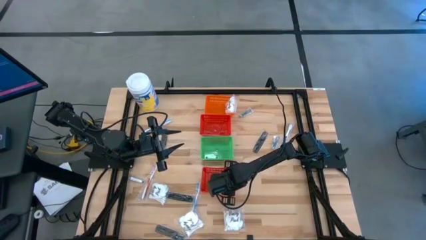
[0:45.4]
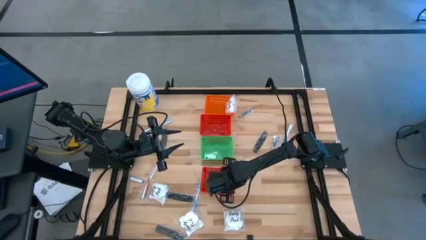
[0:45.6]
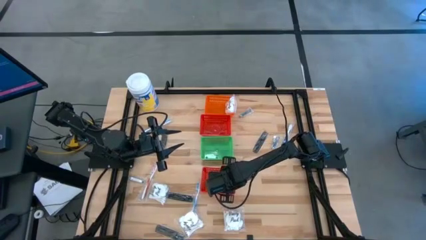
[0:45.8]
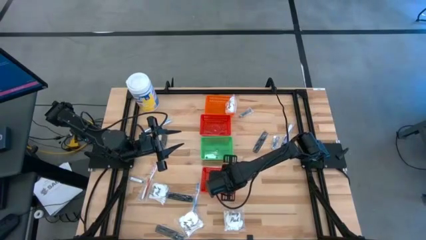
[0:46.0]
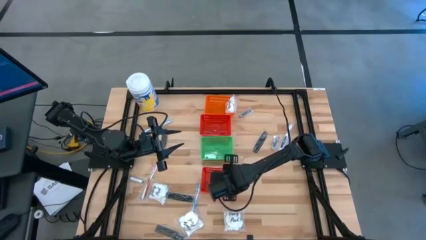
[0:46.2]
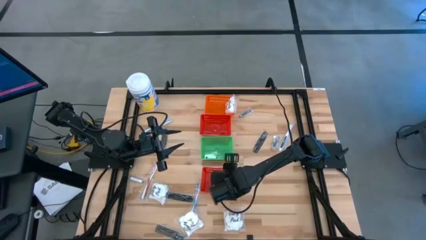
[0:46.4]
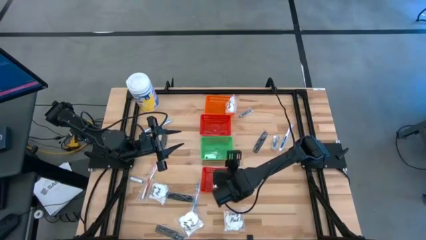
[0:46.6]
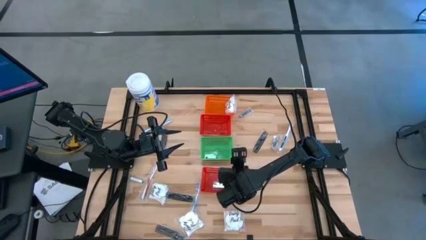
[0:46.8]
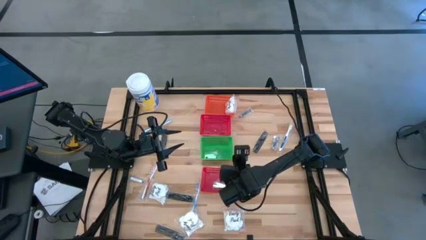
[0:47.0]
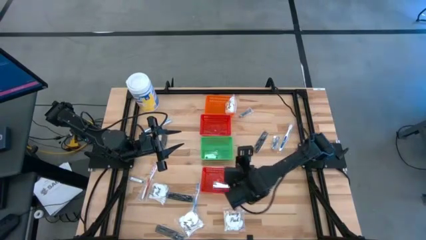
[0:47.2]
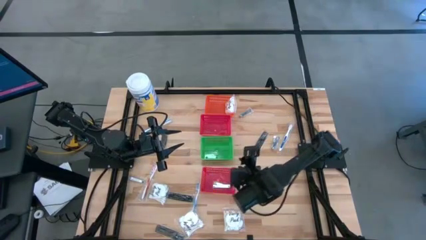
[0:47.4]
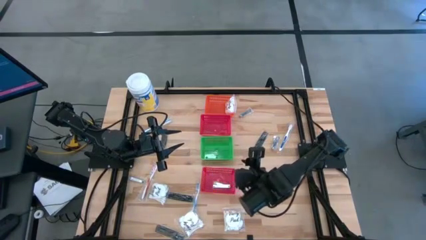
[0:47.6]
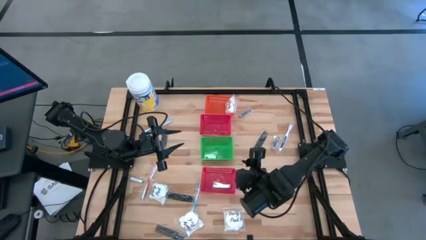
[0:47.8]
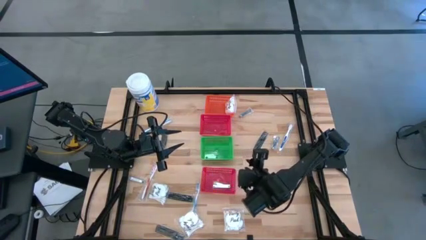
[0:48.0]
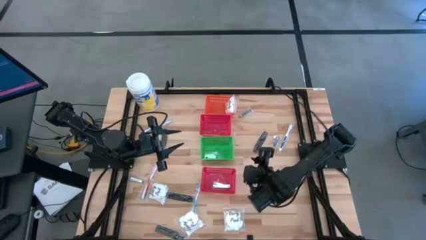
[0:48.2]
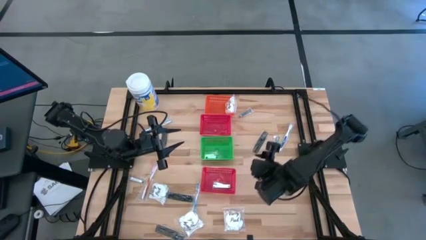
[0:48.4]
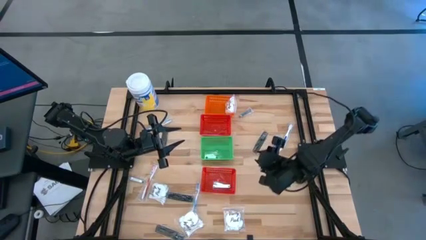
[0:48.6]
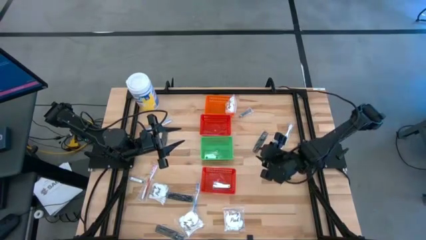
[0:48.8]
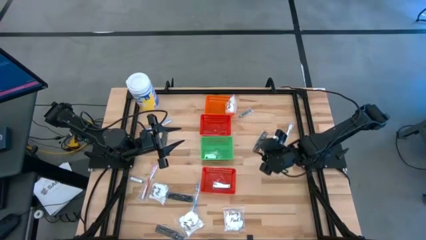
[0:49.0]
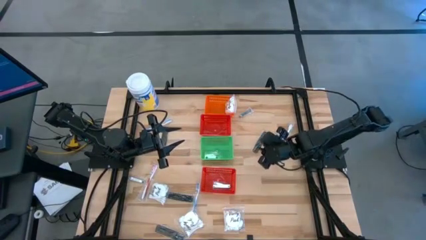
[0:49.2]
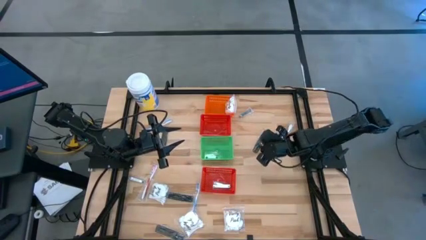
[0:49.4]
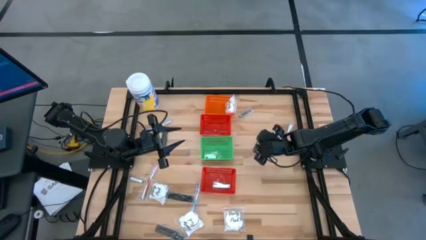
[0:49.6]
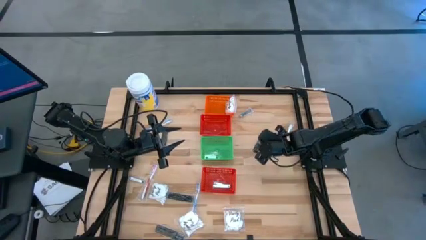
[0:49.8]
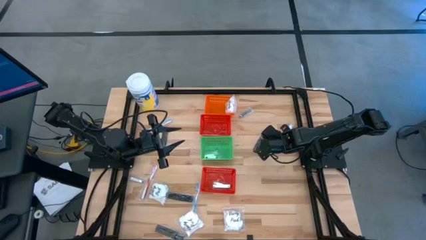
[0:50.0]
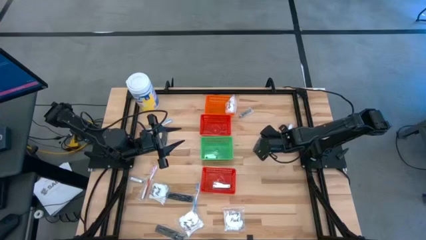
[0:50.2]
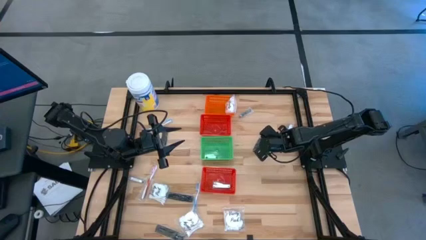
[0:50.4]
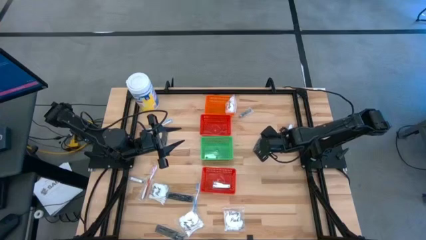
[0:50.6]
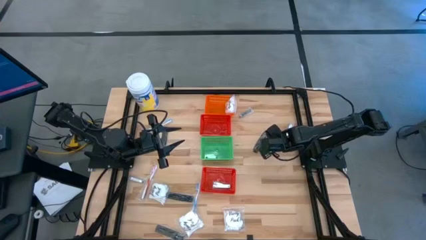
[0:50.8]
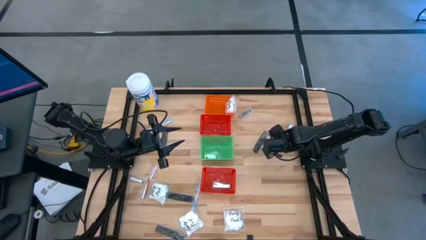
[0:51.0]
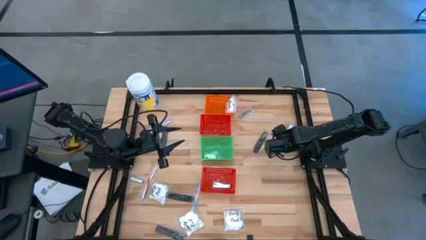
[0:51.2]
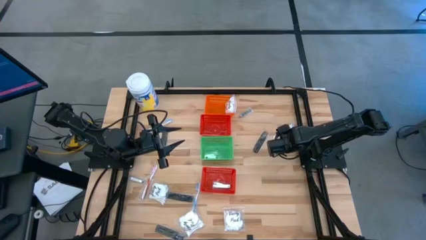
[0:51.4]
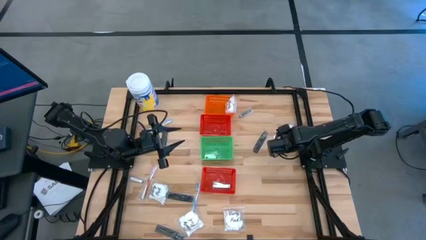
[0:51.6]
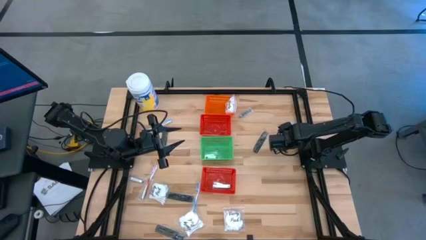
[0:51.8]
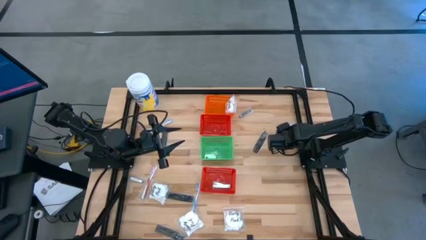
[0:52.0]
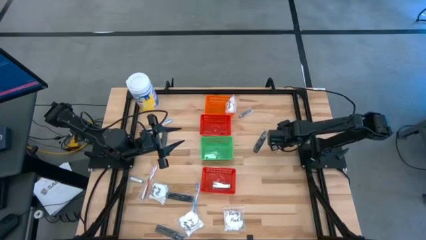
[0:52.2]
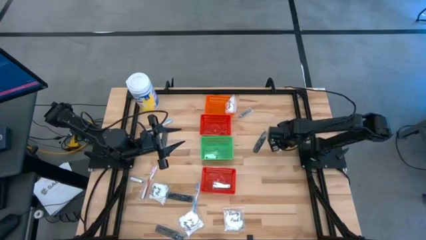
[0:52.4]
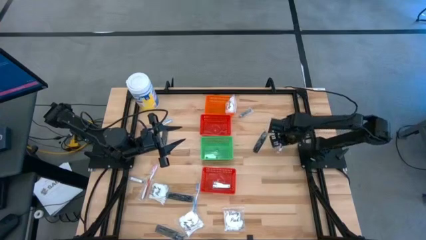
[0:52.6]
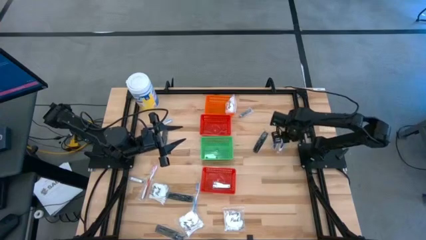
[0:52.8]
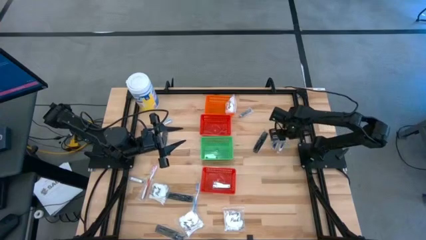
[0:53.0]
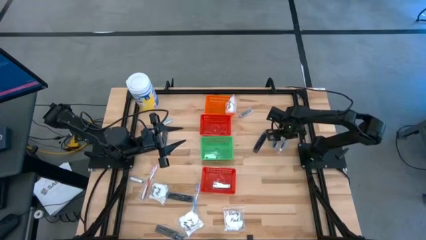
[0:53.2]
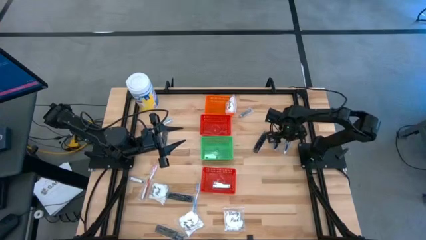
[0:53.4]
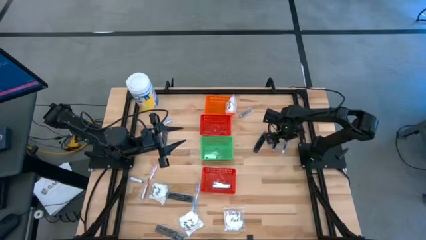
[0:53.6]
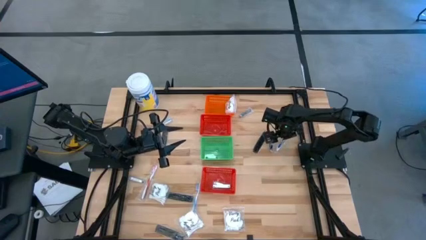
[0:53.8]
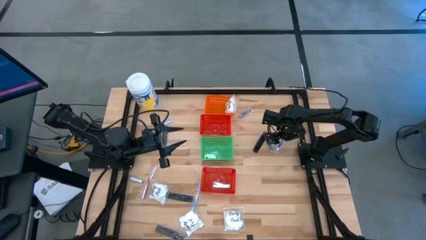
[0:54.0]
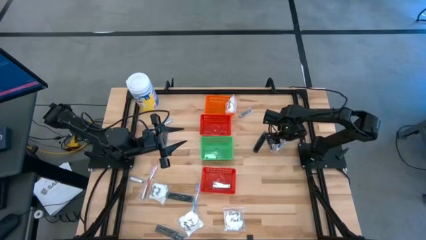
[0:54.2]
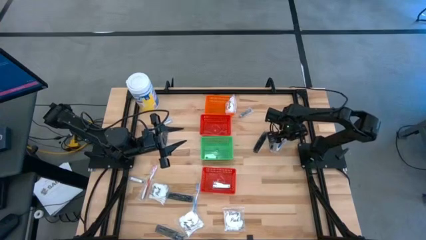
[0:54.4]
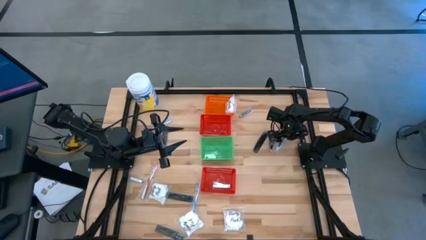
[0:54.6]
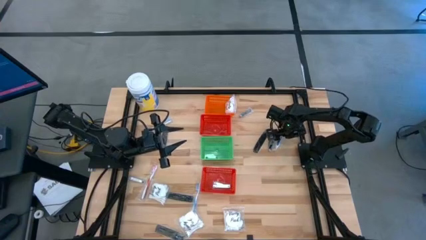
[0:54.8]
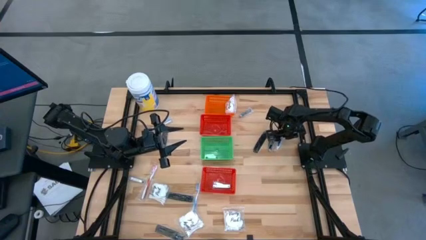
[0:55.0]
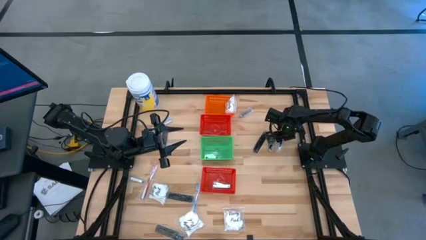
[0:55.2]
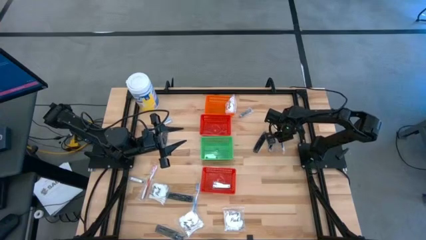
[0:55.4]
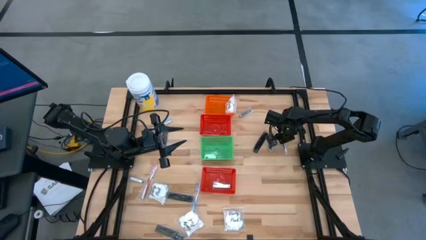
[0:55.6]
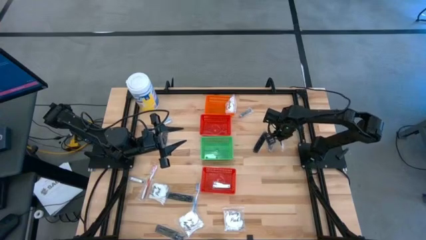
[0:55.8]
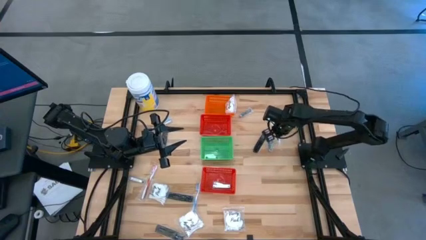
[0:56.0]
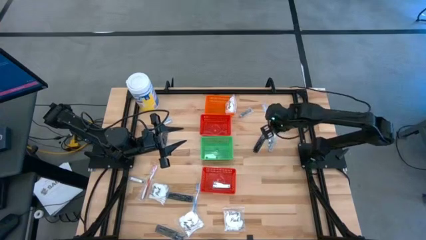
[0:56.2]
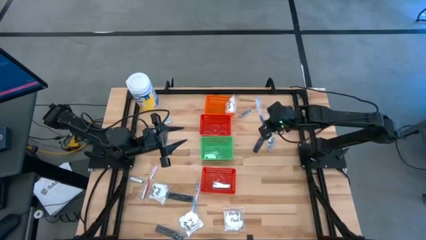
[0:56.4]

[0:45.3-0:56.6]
Task: Pick & Place Travel size toiletries
Put the blue toothbrush into the top red basket

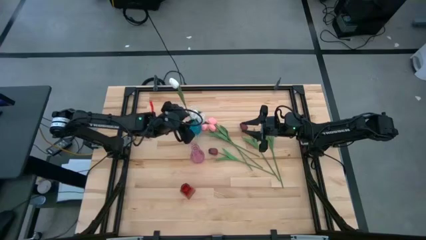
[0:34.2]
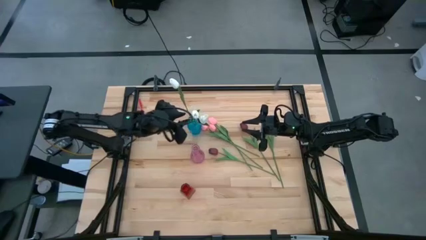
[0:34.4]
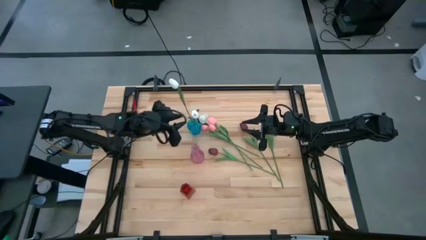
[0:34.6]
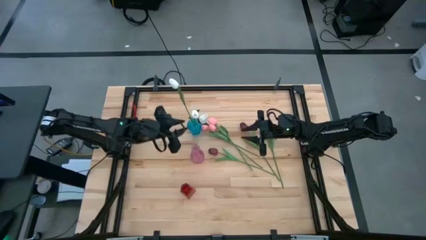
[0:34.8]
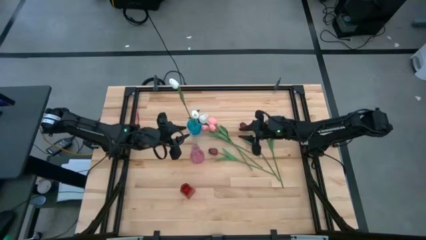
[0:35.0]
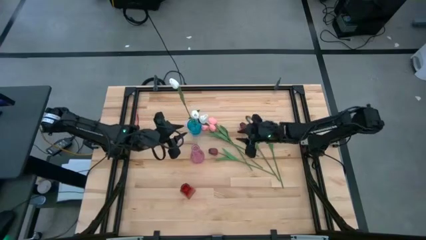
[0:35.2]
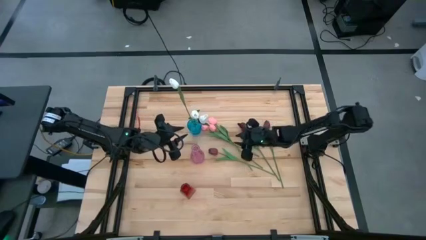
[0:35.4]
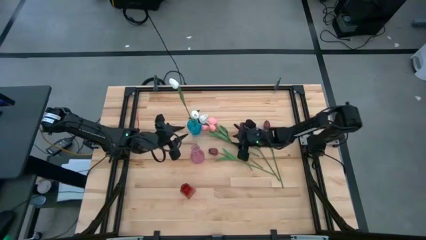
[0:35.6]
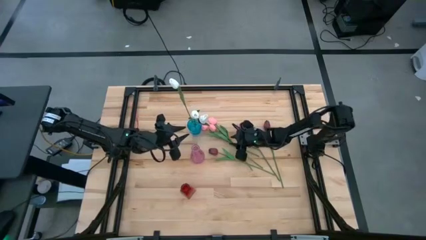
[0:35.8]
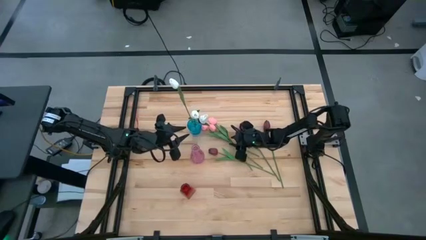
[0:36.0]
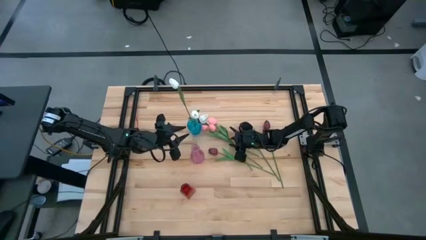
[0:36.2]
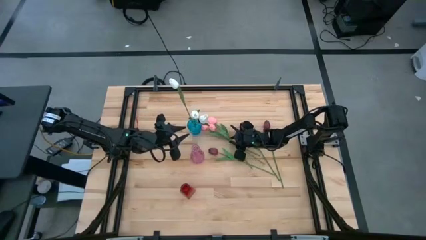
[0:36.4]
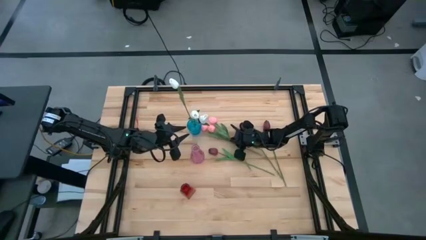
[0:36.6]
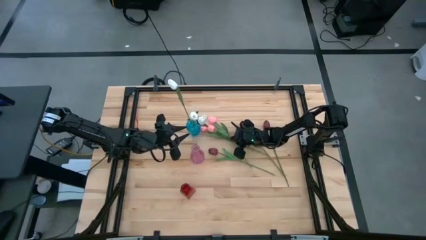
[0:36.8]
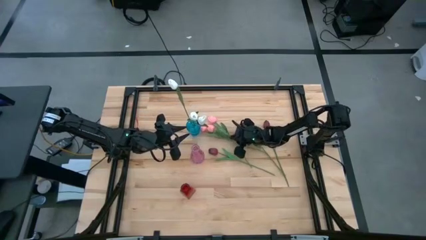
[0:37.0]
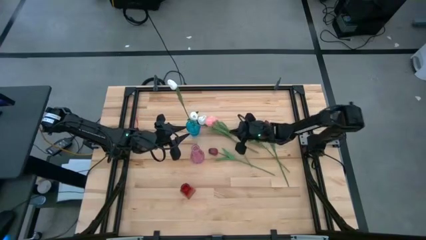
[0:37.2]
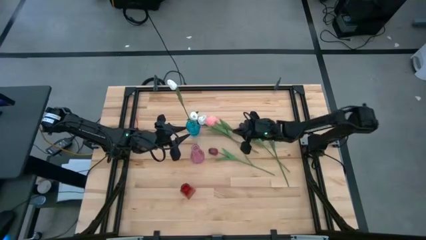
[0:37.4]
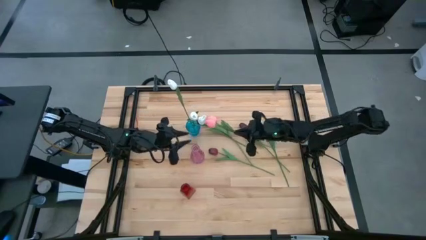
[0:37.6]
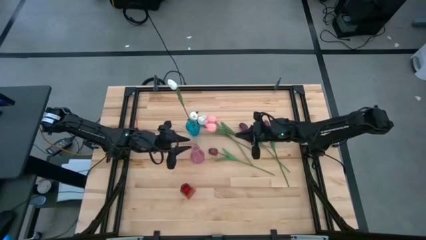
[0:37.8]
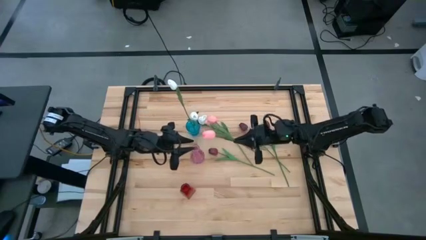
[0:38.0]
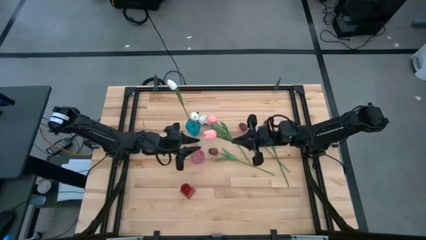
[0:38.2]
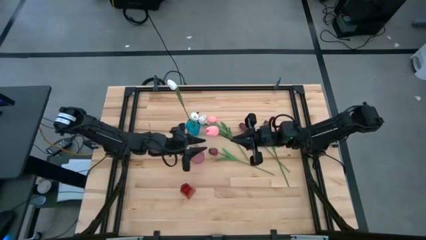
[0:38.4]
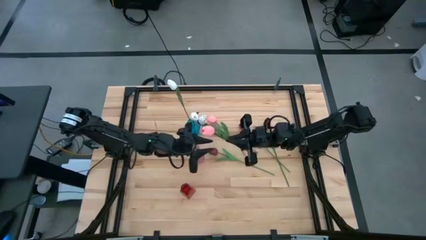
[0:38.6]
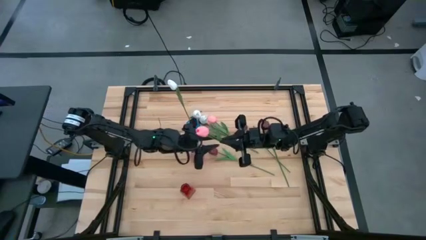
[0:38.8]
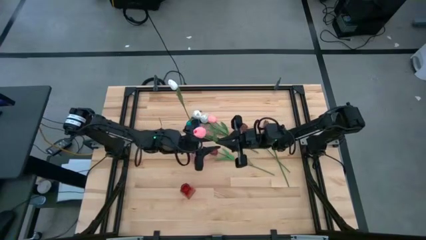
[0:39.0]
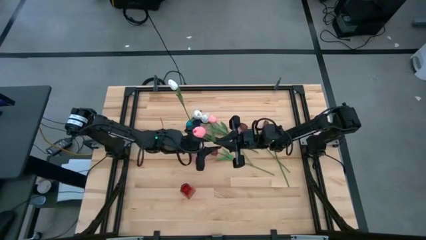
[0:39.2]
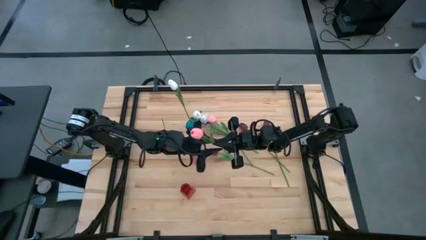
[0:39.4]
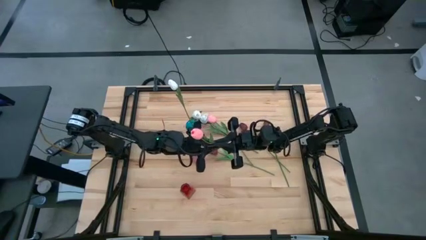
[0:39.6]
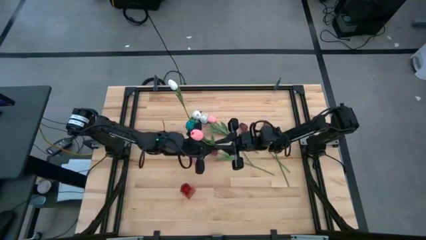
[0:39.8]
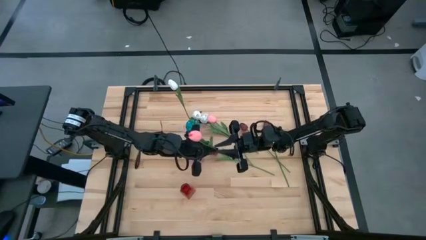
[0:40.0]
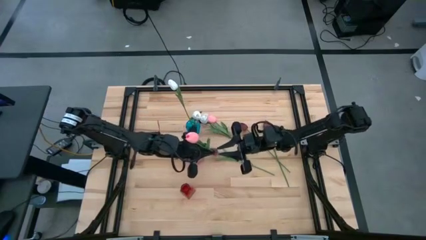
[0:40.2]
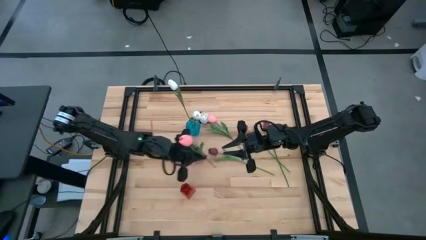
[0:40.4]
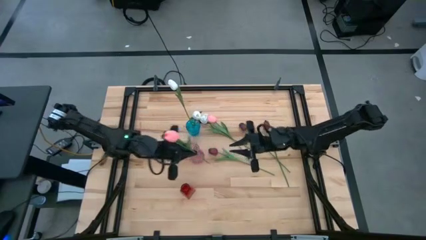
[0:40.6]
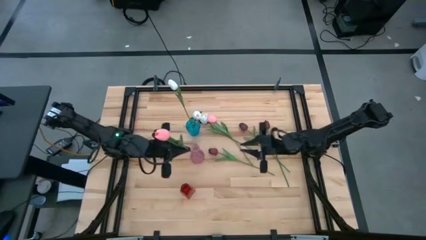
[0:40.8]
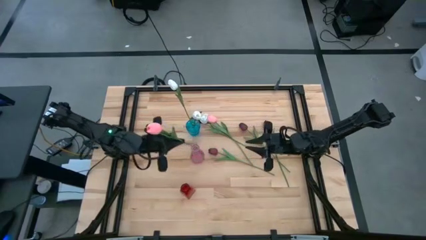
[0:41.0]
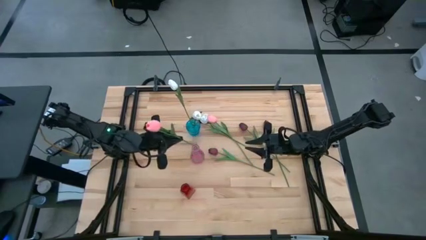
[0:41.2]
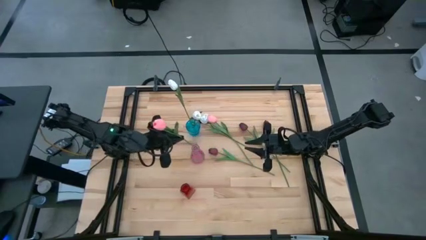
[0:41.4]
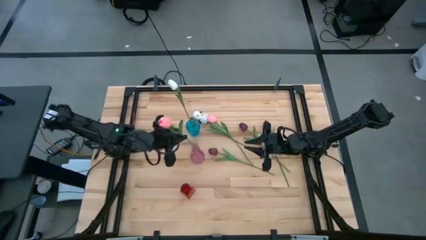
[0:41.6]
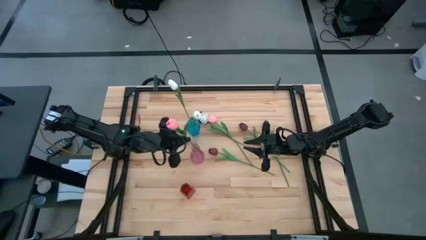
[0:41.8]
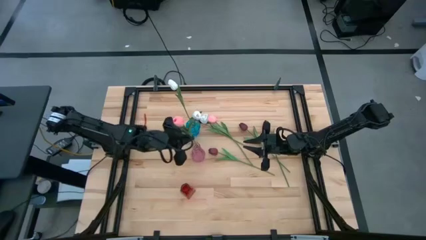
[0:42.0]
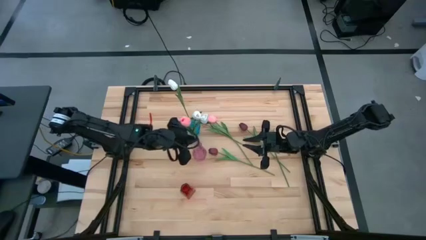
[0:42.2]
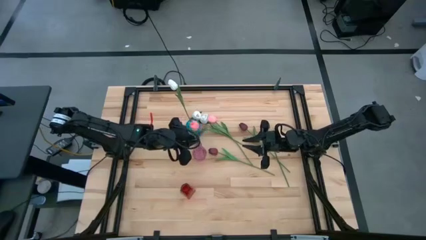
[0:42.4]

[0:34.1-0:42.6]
Task: Sort flowers into vase by color
Put the left pink tulip into the purple vase
